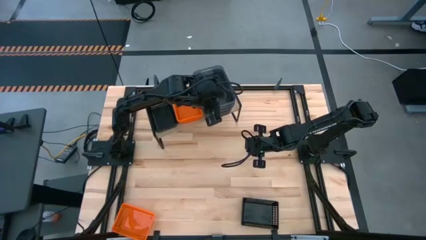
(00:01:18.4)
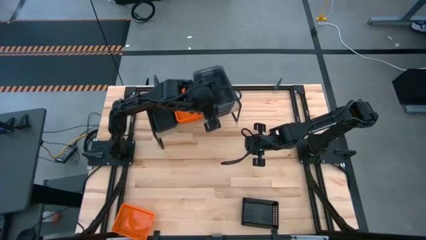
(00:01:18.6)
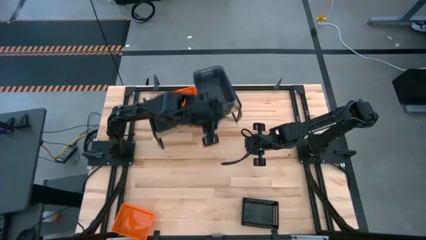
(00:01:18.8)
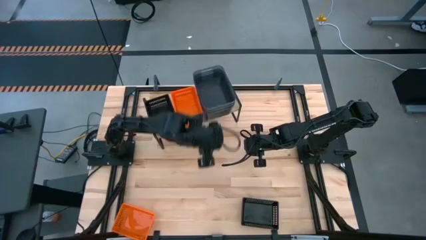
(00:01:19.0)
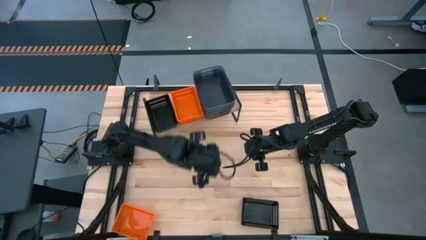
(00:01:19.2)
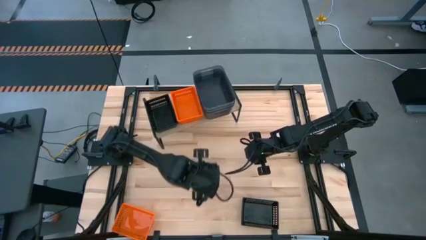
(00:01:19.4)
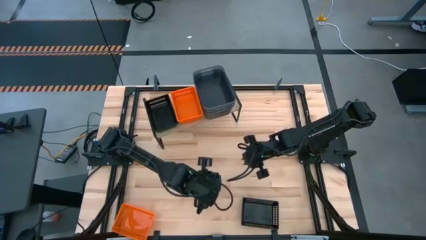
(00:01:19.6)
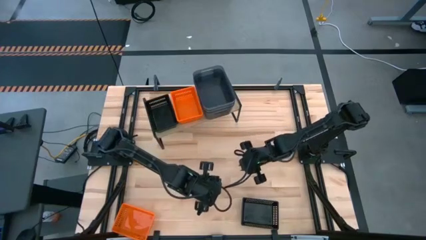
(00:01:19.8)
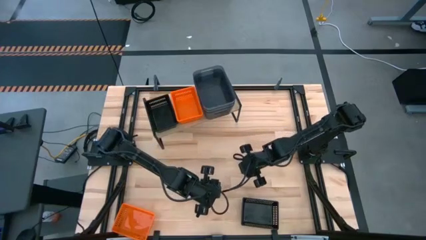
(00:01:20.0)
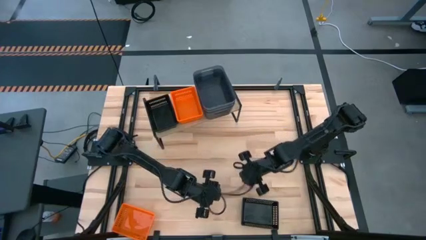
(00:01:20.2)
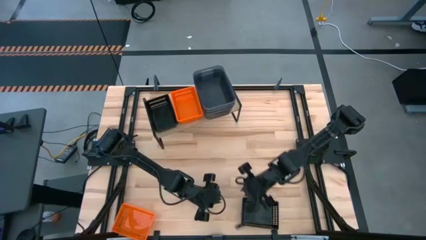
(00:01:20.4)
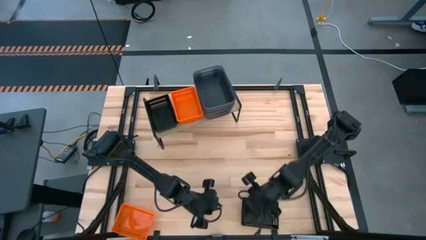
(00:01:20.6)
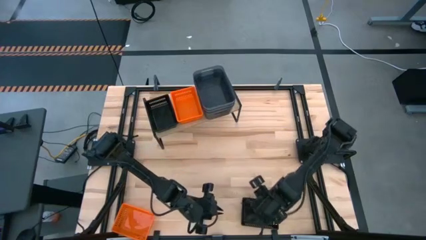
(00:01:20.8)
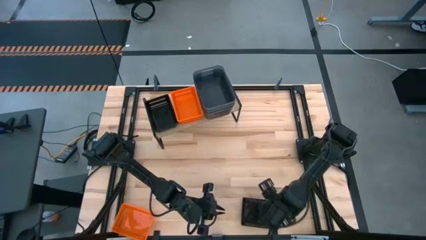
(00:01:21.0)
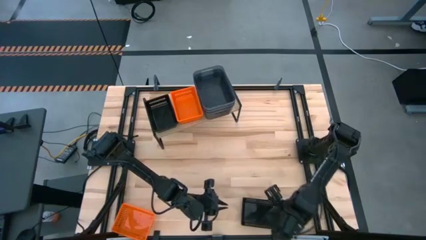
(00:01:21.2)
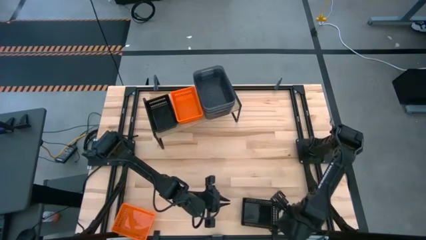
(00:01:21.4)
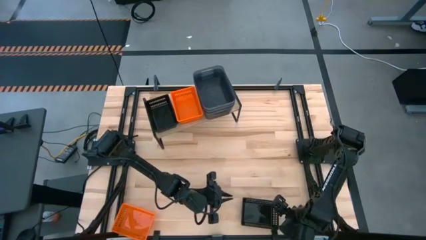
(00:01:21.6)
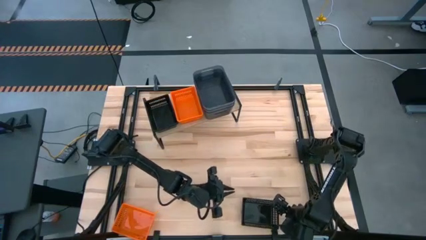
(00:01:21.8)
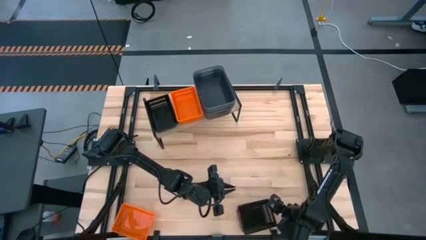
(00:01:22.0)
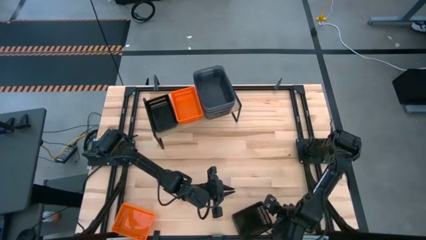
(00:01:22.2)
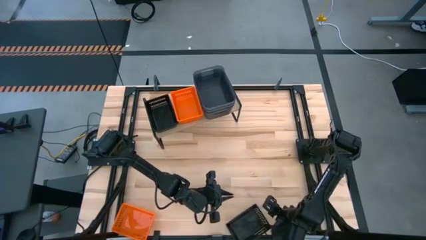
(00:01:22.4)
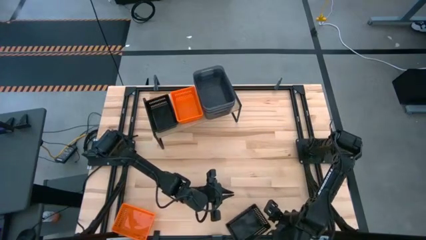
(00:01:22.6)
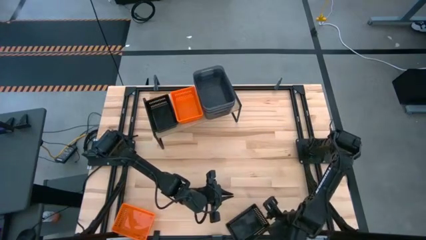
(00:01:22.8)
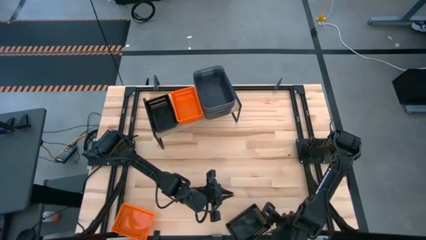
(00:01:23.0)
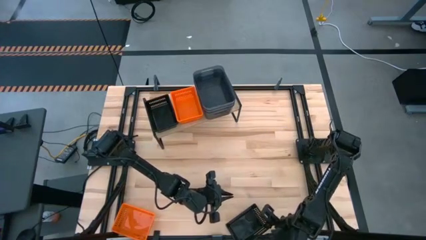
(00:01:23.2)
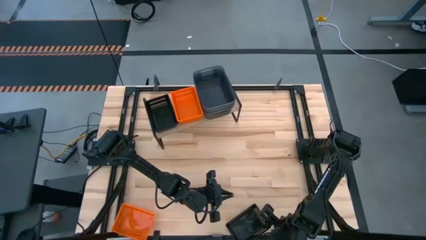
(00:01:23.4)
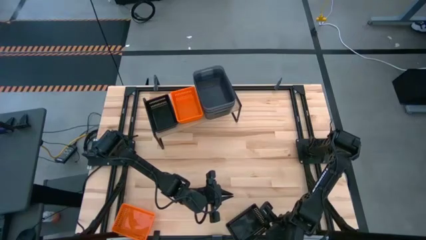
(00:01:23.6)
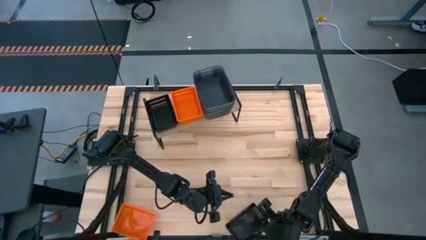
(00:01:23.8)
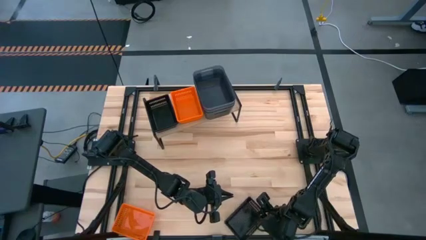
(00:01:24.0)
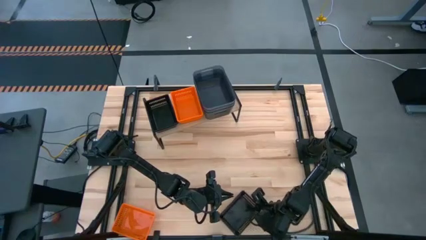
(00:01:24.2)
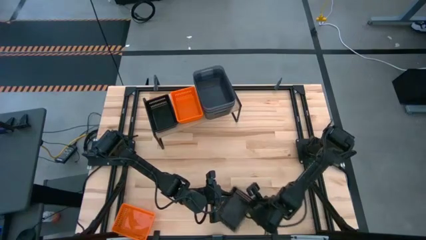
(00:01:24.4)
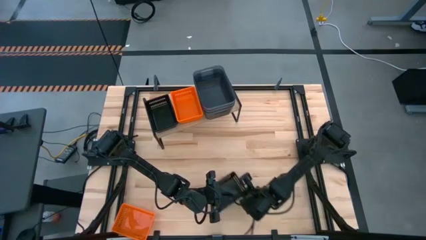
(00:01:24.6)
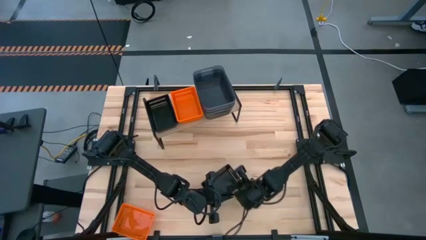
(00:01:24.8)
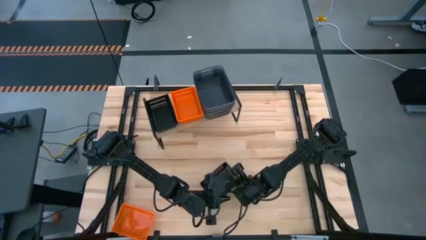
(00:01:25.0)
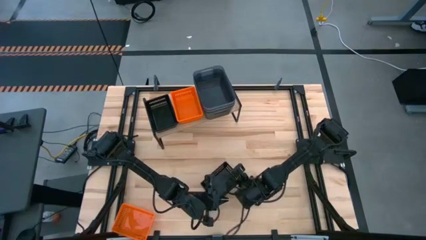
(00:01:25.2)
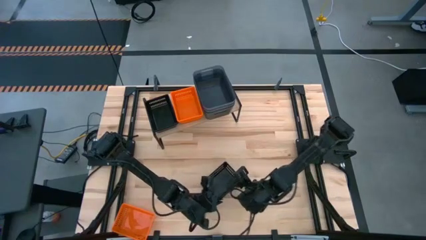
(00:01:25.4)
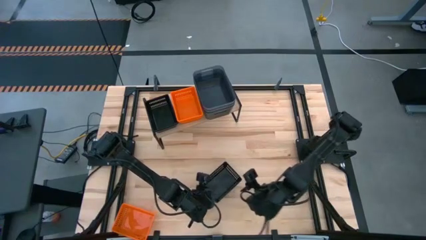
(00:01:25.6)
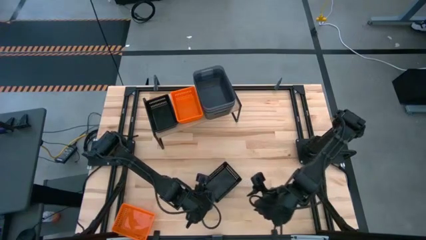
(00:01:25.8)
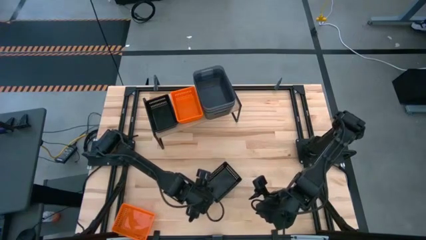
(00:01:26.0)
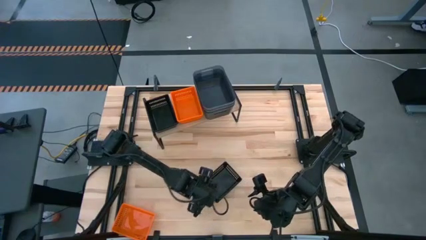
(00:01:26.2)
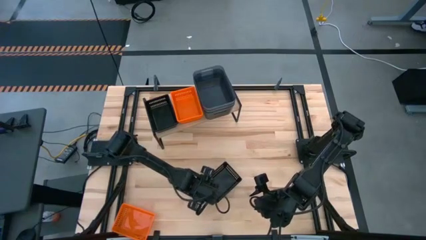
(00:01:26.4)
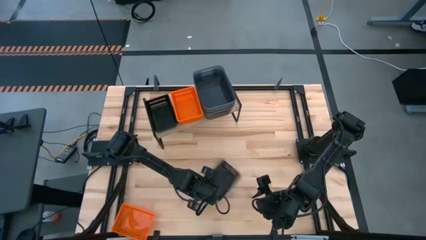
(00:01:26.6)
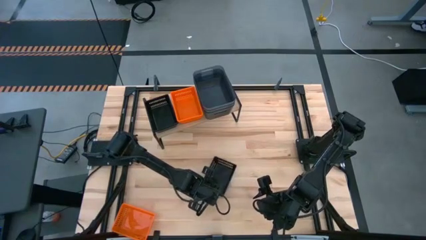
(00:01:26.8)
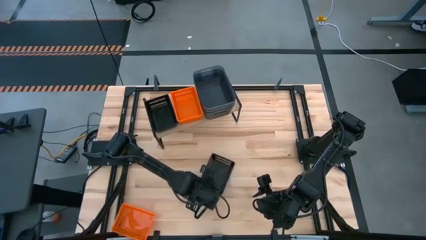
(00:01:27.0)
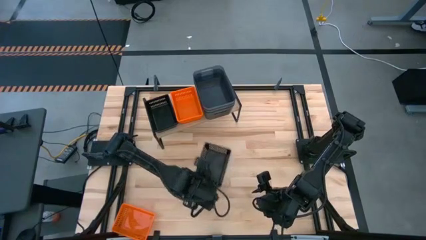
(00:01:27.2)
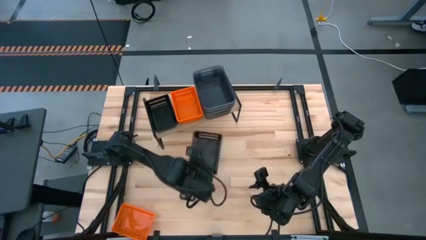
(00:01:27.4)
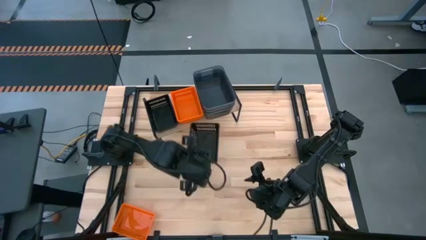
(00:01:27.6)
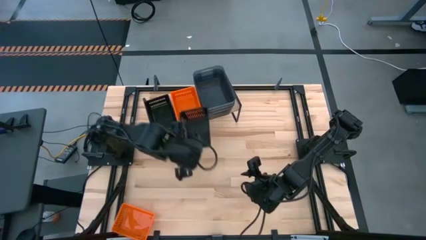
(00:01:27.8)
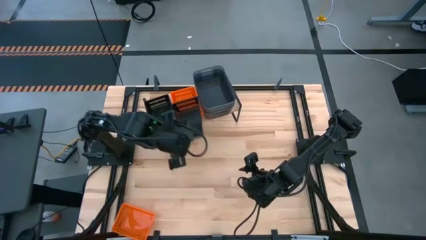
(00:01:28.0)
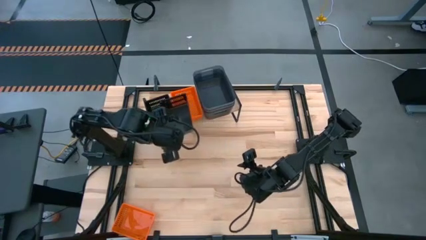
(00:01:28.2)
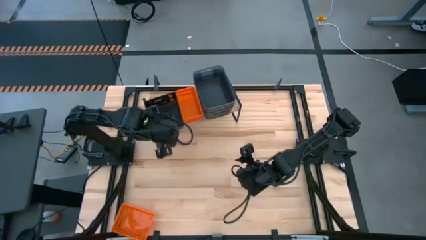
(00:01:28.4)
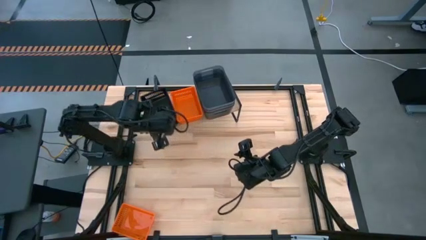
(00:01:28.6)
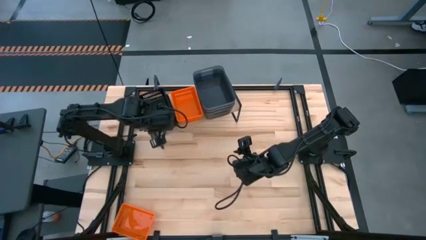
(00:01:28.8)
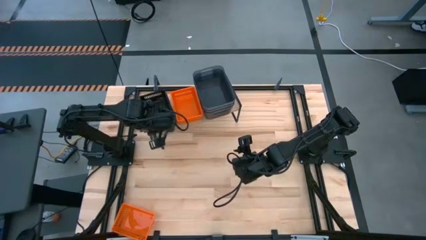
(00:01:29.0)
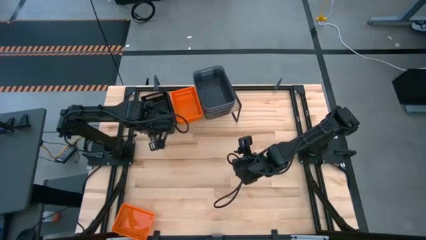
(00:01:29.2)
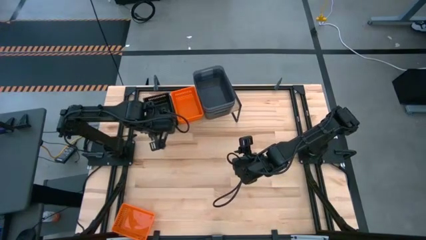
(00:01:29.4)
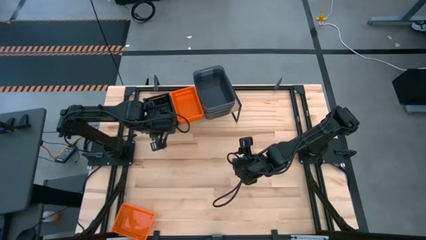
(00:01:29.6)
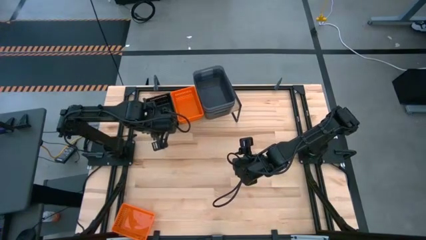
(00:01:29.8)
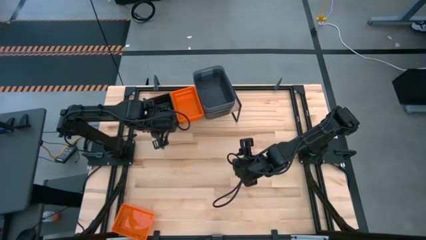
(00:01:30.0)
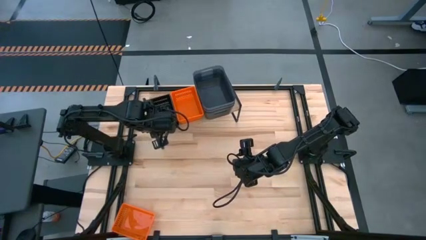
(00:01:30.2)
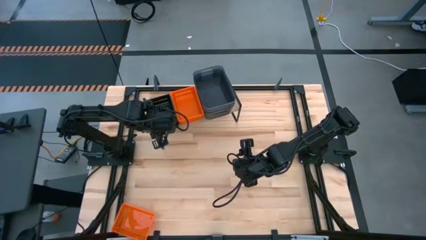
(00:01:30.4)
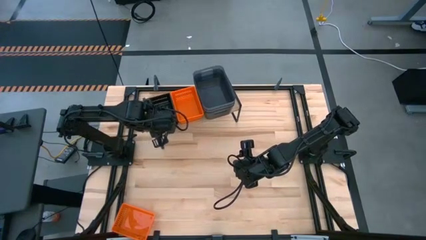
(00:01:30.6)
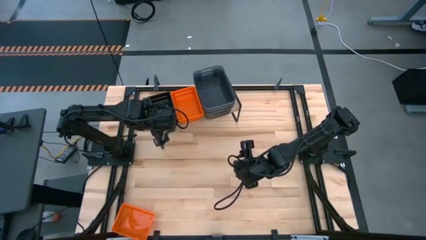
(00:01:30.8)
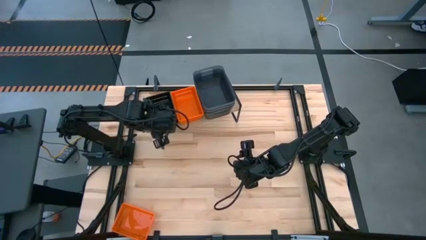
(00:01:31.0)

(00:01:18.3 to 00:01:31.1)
Task: Stack baskets on shelf by color
Stack the black basket on top of the other black basket on the shelf

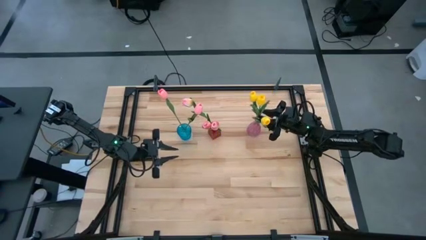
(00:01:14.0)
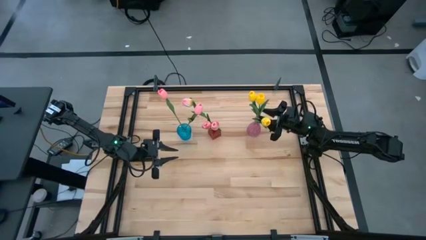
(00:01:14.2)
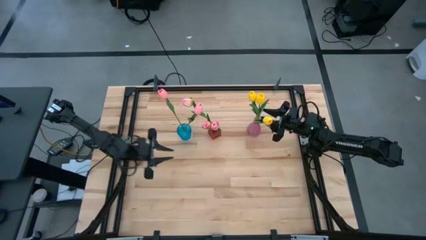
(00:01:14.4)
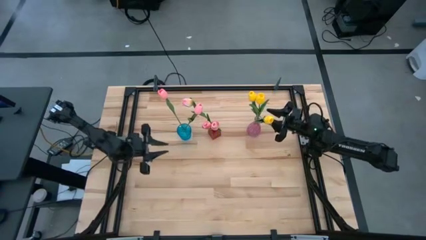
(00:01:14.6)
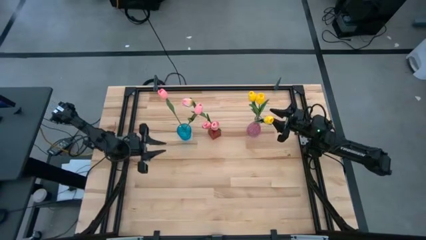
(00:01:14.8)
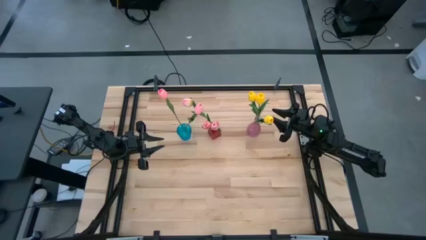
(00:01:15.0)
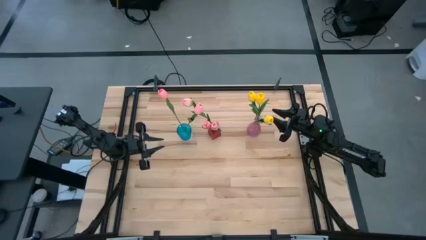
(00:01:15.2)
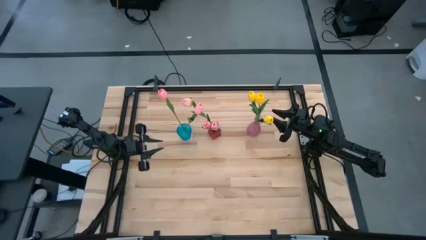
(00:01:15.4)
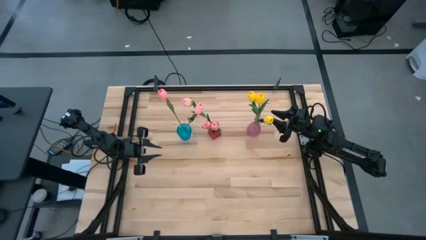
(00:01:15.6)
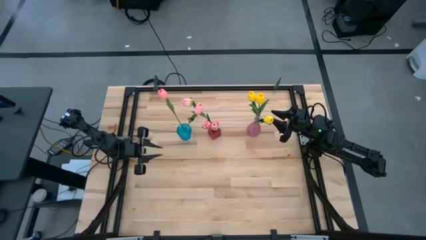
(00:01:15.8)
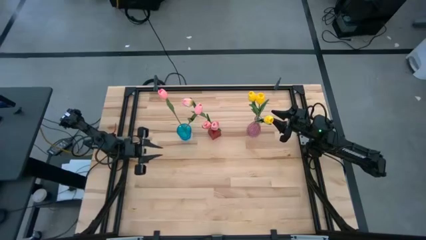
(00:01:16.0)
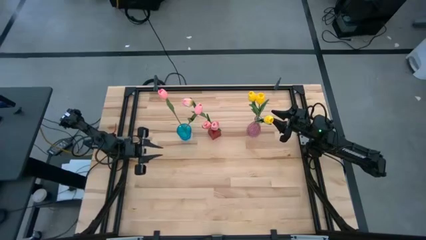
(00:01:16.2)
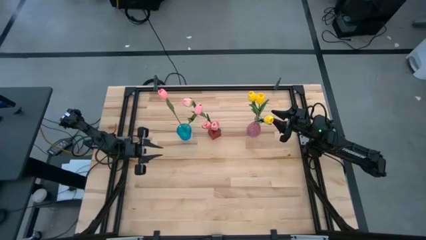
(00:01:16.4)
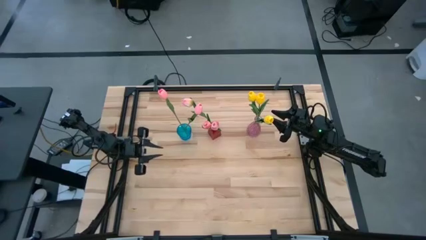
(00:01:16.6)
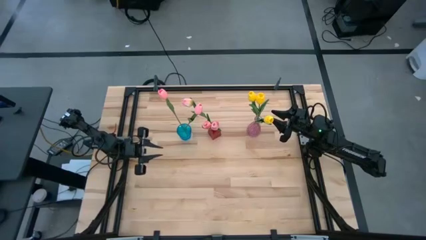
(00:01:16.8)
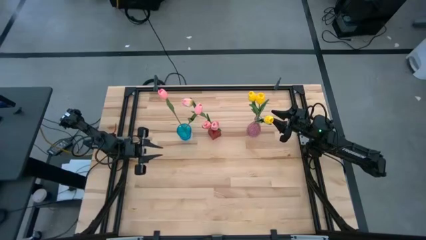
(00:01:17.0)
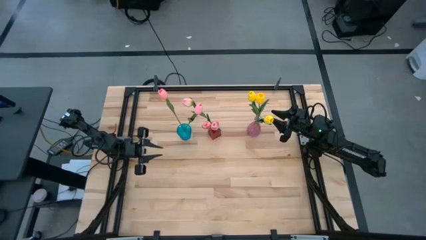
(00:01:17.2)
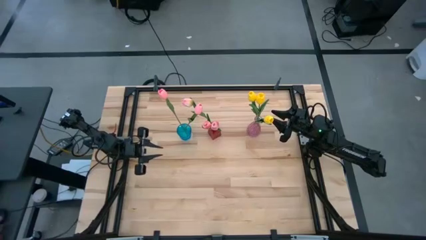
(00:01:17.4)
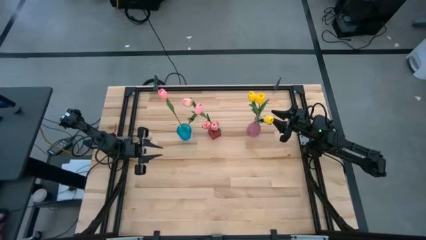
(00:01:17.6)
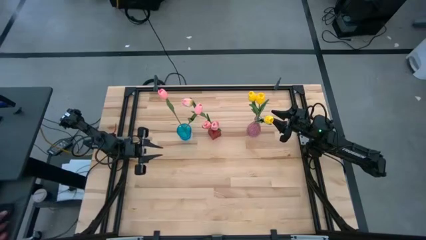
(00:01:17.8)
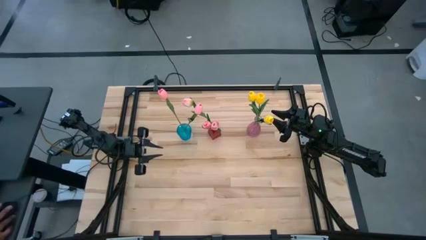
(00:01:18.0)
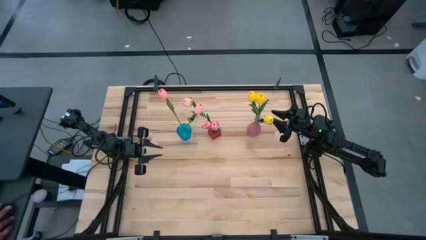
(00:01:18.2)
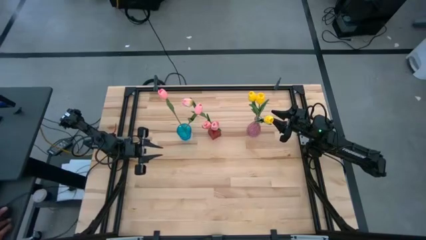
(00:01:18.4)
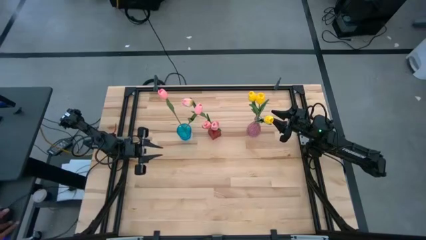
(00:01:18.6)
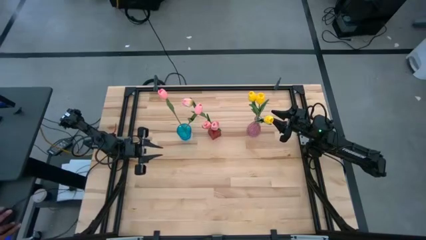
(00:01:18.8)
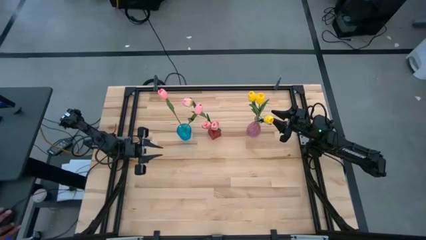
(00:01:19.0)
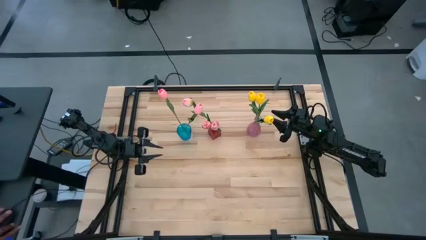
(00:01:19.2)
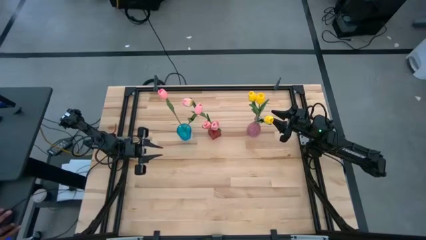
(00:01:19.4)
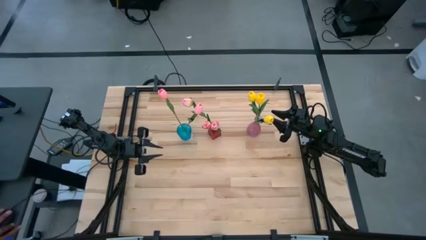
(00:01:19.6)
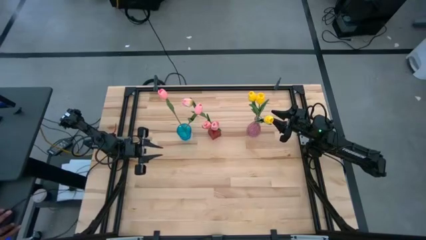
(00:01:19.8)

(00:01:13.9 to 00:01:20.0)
Task: Sort flowers into vase by color
Return to Home Position
